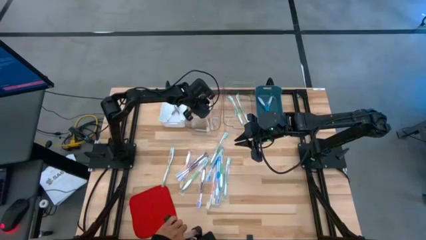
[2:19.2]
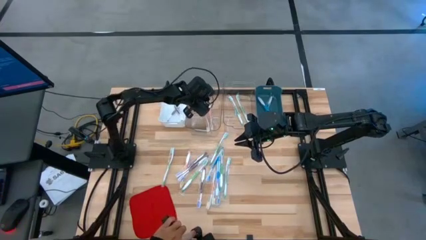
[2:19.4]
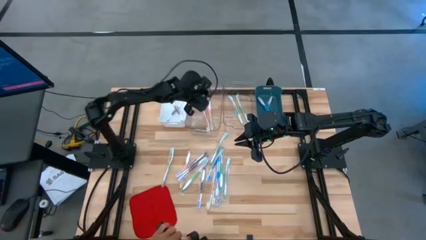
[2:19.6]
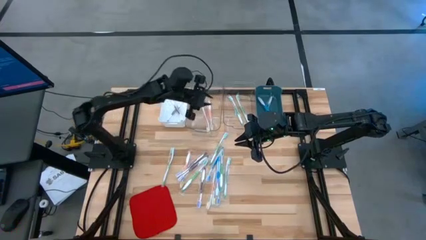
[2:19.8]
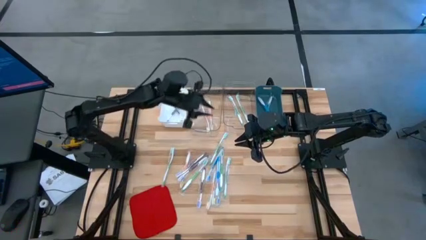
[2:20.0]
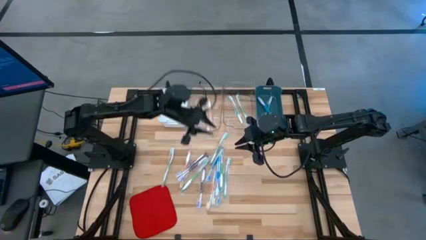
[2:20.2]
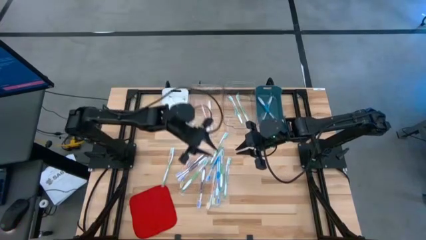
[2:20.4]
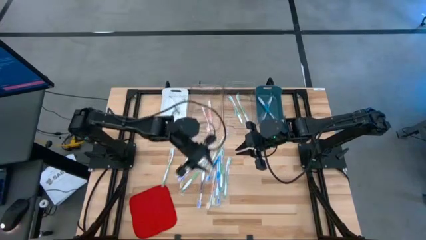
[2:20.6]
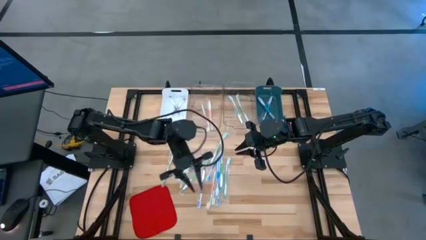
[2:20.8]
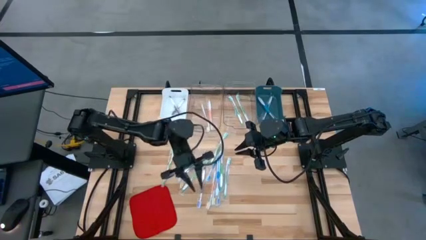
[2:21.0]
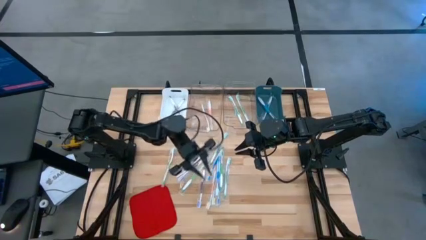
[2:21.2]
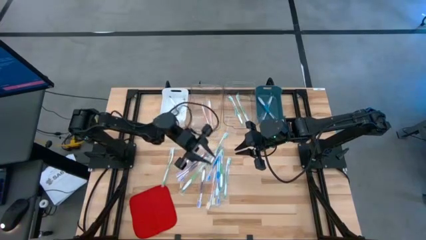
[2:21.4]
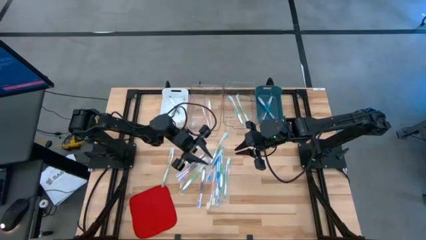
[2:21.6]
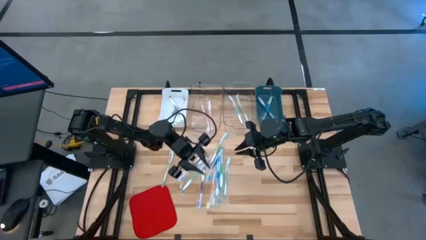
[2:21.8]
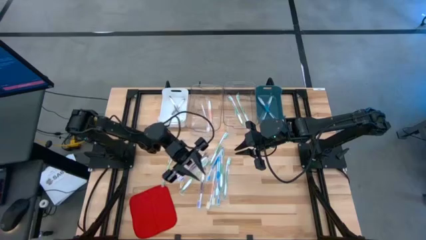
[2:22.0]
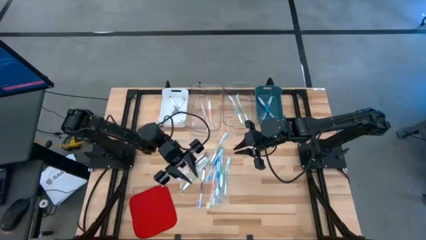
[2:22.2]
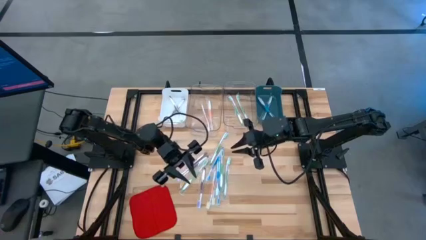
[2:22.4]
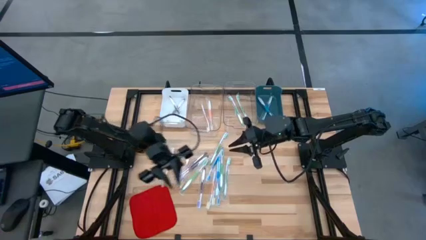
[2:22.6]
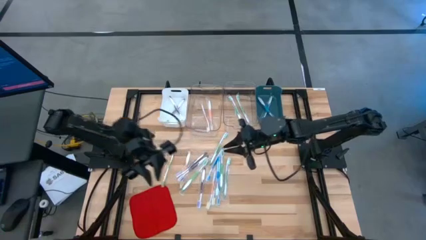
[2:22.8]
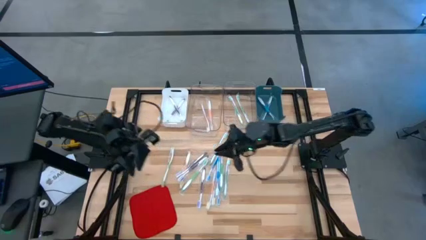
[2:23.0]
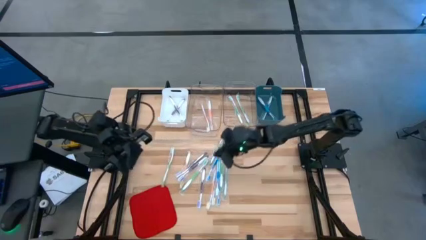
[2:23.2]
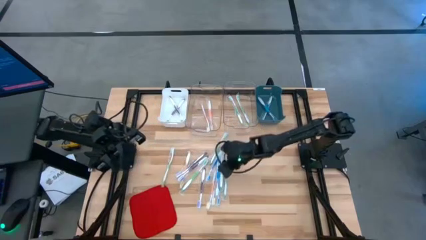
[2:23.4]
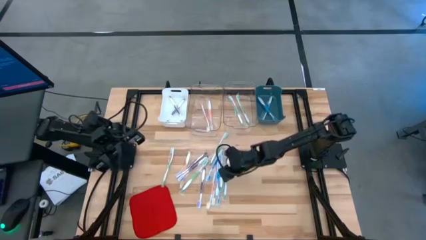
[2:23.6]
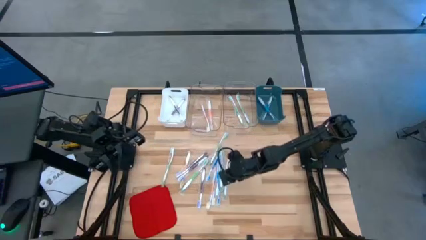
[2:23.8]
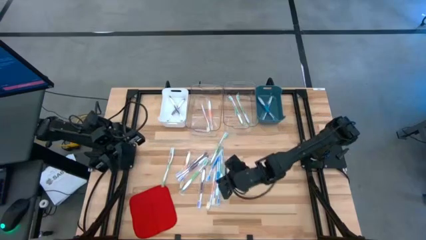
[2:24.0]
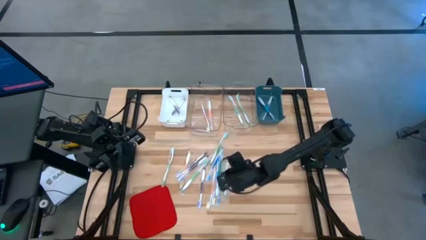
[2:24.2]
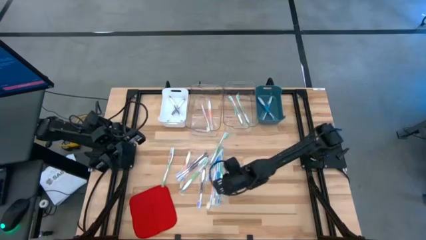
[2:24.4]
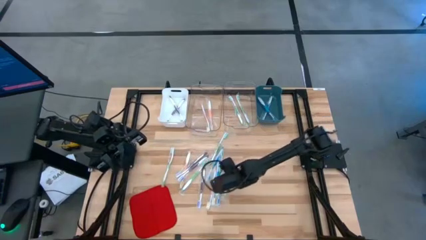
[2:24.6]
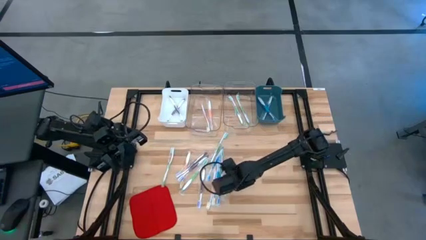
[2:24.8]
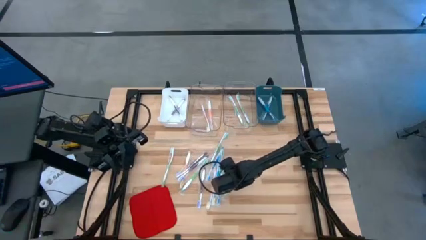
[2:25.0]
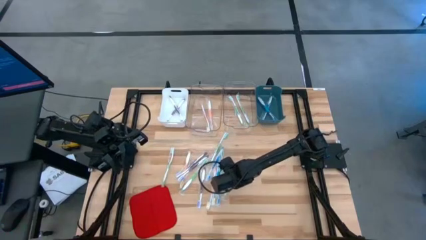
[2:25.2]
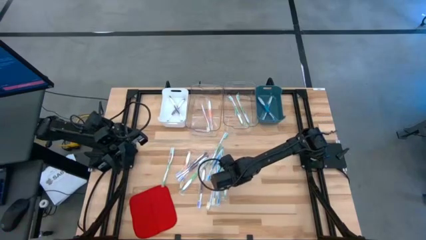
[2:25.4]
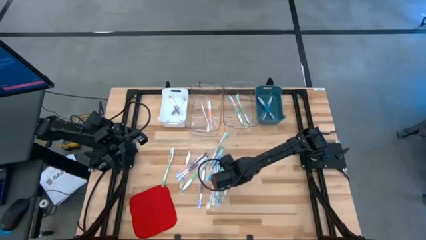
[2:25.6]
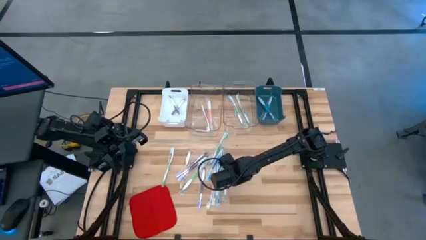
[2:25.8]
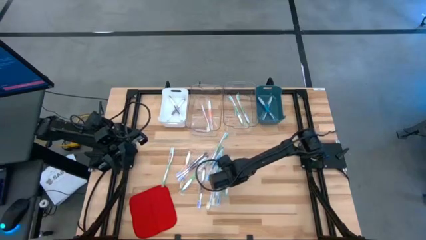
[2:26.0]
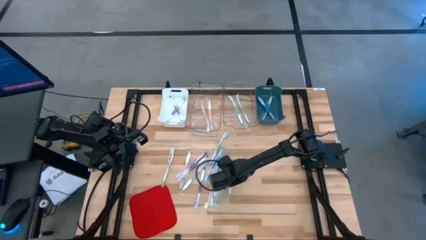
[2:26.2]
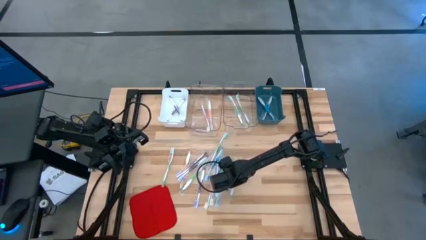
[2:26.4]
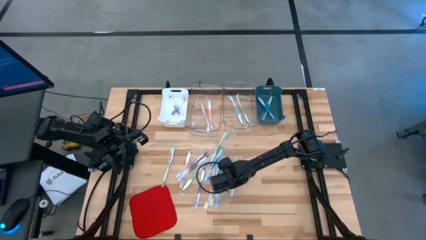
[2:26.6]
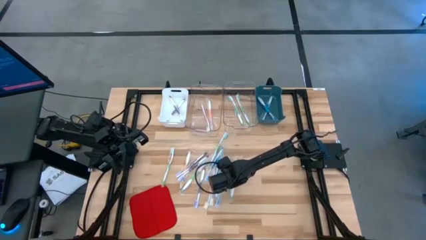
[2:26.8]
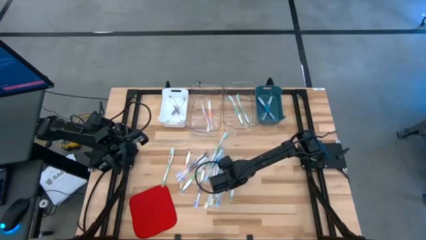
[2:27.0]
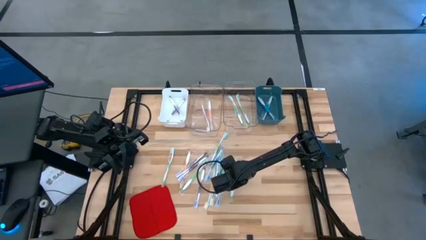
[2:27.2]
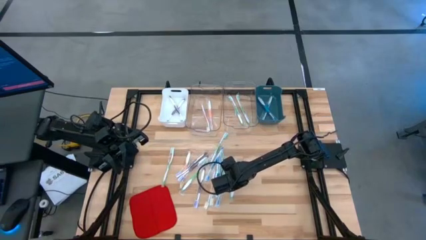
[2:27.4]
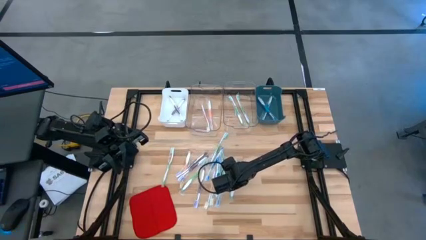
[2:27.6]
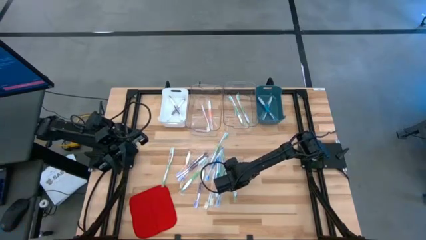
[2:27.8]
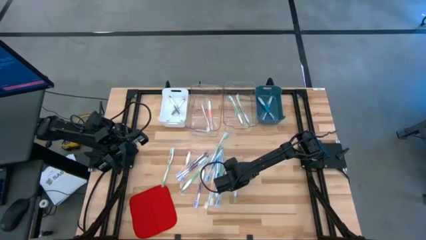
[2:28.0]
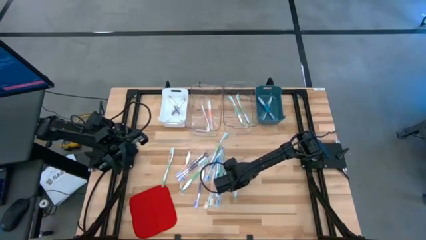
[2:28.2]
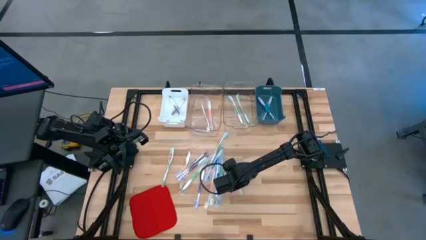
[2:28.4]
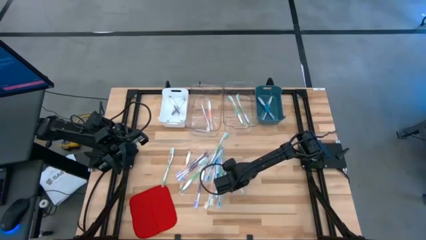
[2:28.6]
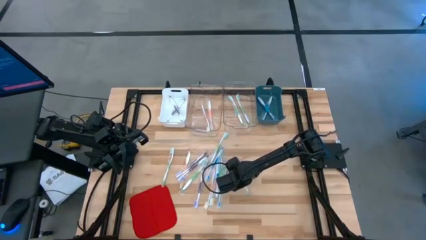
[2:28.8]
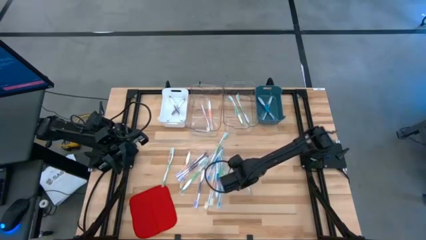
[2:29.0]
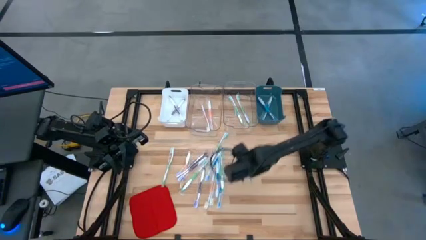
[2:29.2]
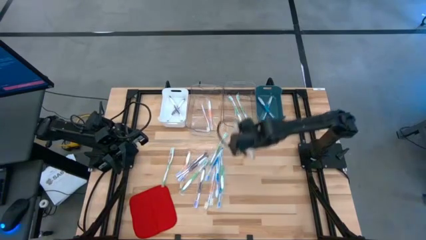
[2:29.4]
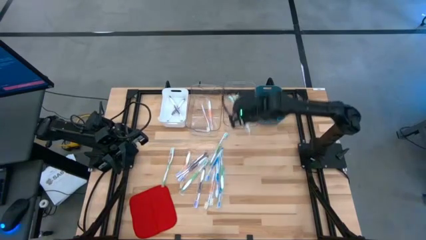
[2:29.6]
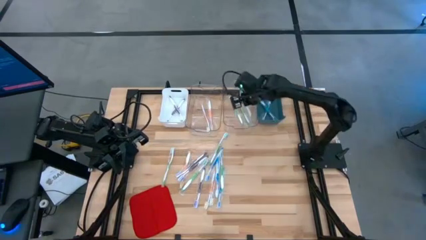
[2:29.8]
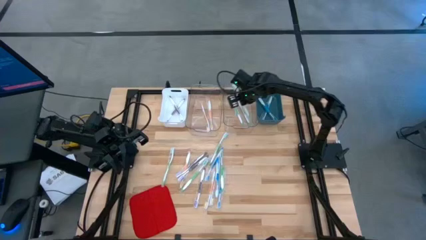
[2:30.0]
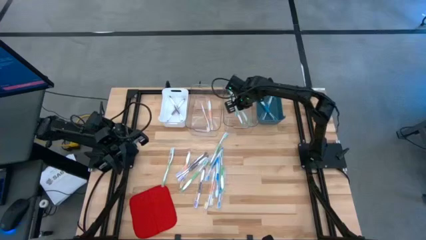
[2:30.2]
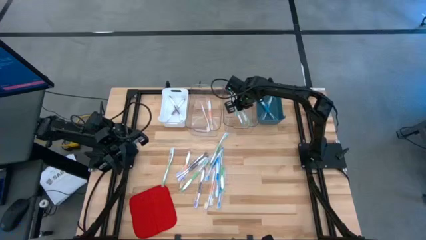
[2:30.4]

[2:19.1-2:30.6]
Task: Pick & Place Toothbrushes
Put the green toothbrush into the right transparent bin
